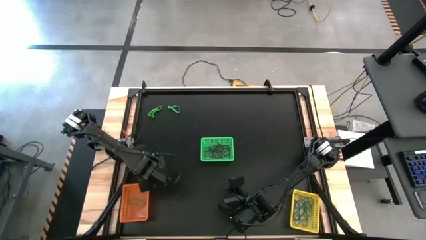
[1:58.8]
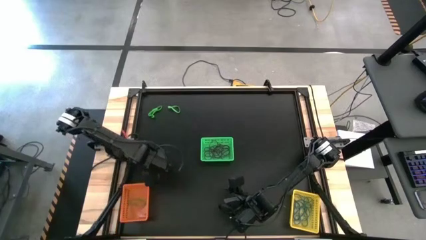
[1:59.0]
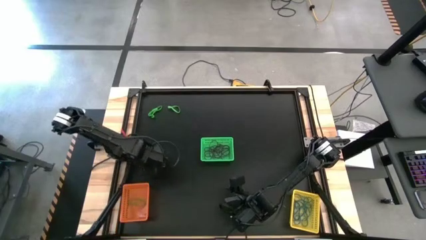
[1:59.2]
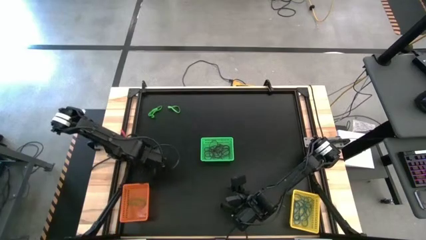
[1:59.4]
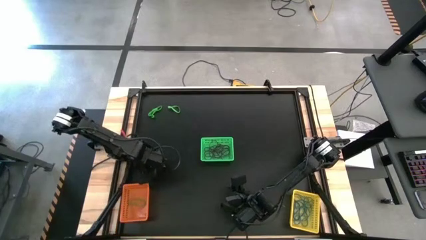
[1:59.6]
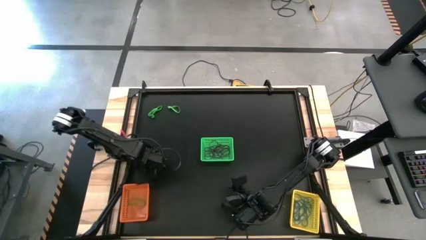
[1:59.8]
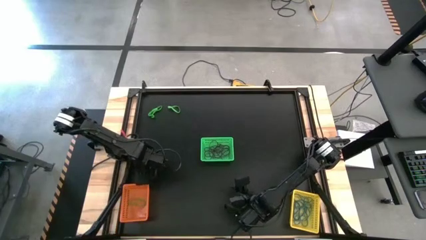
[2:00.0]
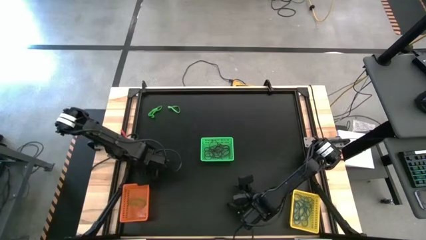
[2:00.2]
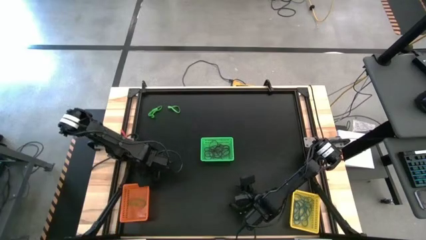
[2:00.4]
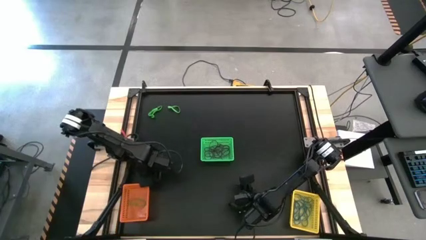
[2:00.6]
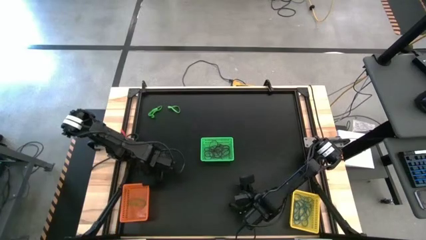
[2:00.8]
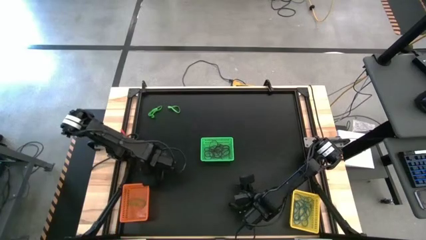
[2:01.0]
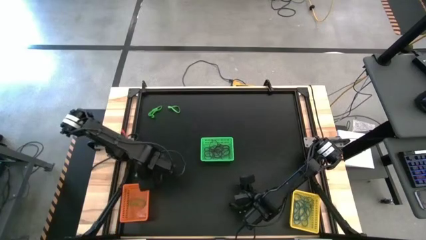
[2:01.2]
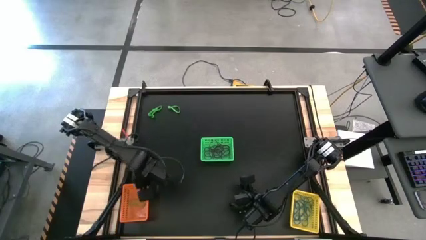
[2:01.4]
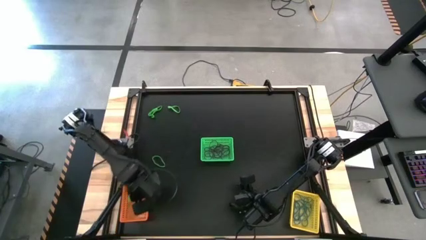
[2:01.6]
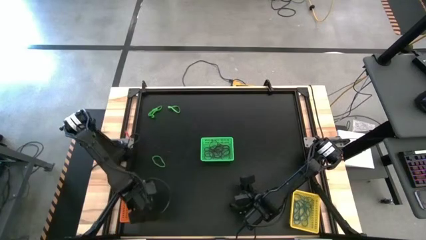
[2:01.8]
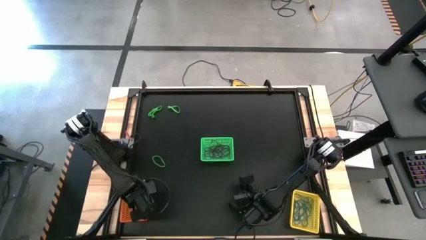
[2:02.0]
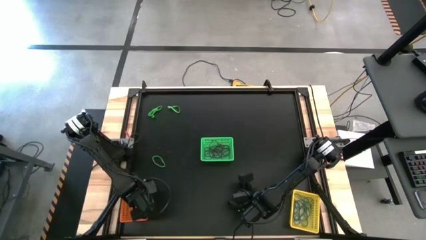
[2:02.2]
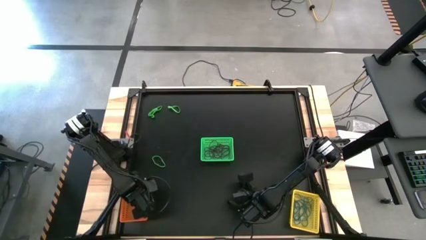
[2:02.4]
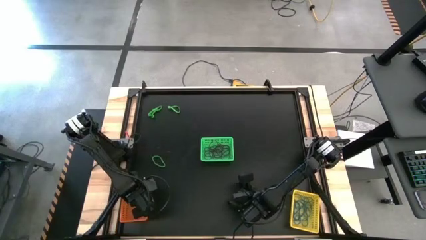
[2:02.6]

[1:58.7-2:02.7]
Task: Sort rubber bands into baskets
Put the green rubber band into the orange basket

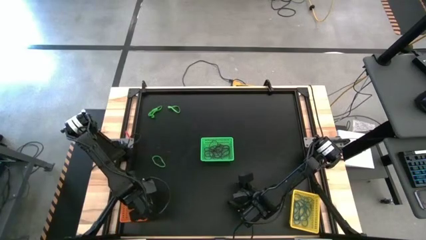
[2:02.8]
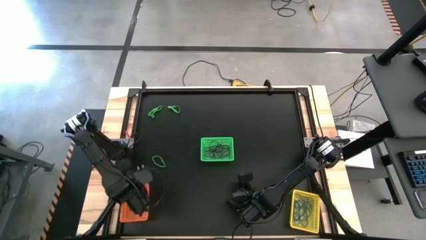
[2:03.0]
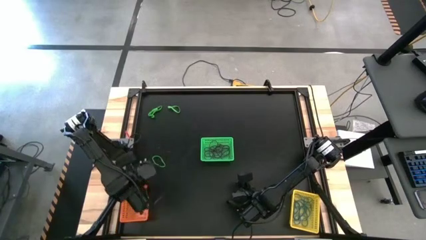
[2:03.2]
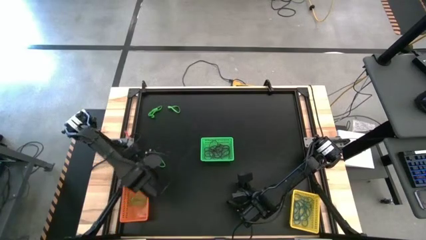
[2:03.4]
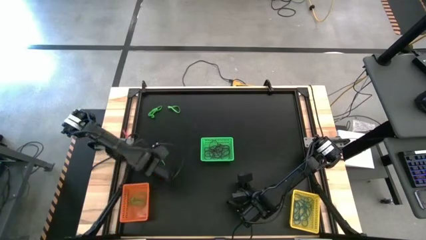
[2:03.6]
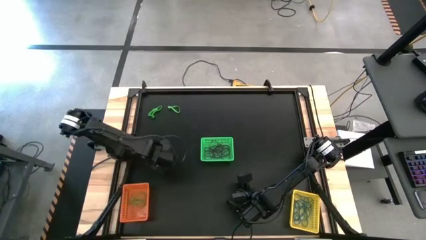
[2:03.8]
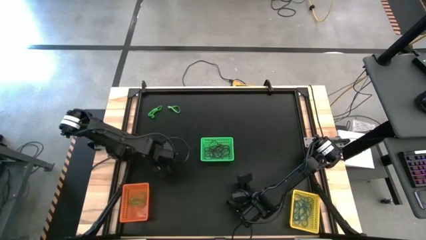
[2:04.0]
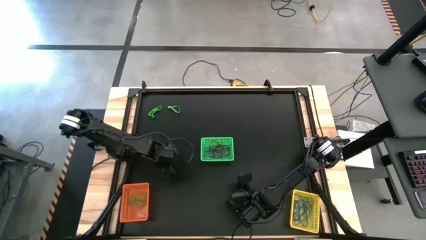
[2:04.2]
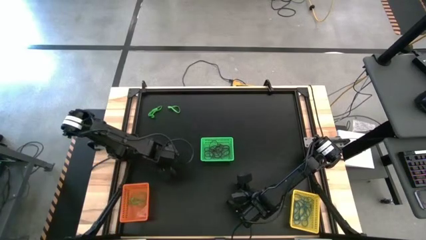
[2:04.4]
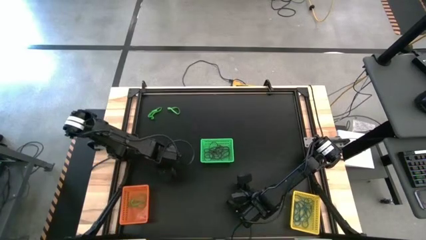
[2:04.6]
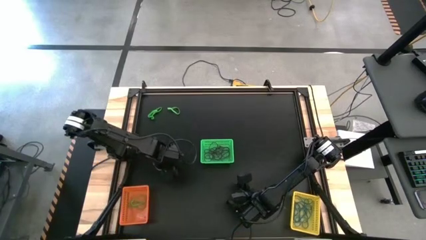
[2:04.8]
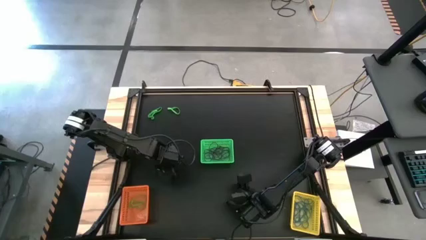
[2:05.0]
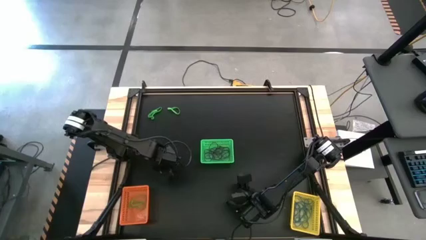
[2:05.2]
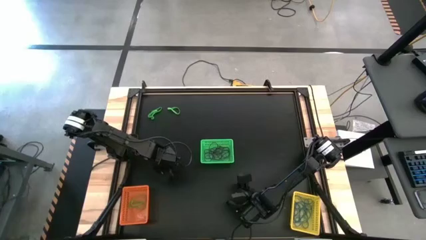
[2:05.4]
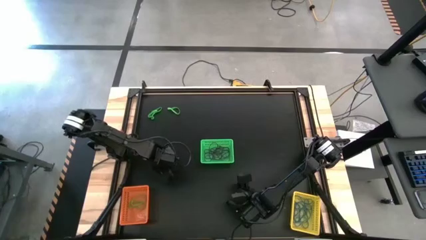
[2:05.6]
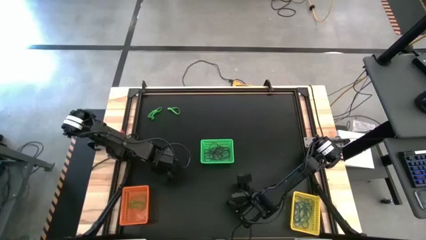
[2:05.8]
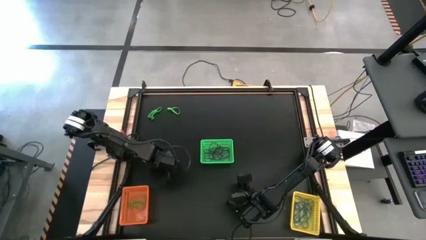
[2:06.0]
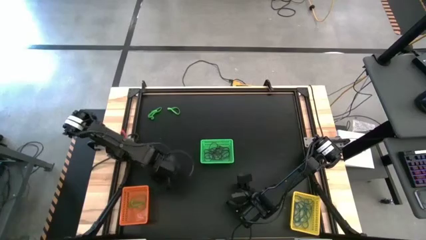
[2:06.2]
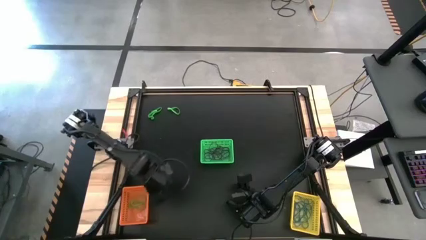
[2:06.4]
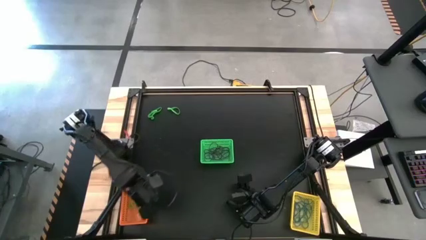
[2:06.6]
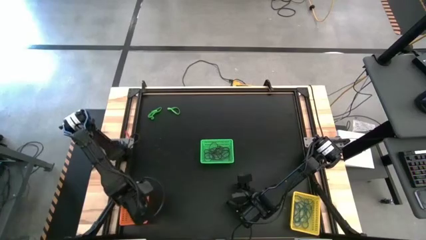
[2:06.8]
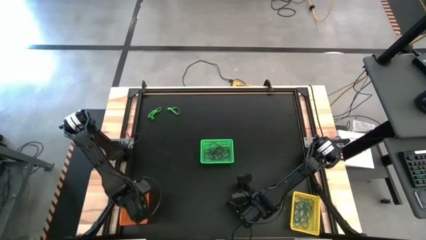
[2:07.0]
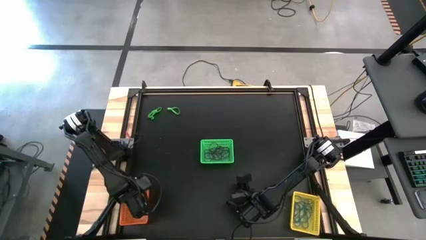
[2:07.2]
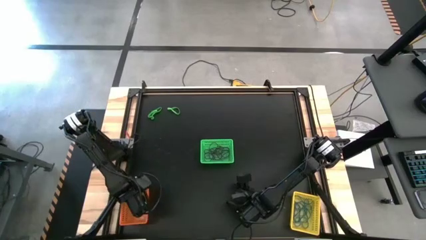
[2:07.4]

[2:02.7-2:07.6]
Put the green rubber band into the orange basket

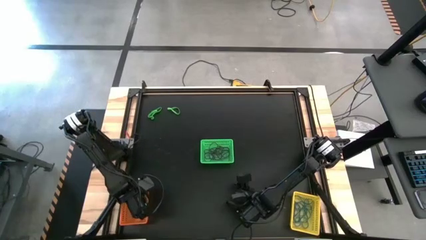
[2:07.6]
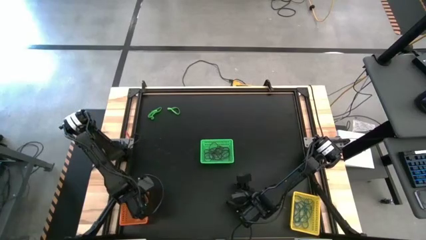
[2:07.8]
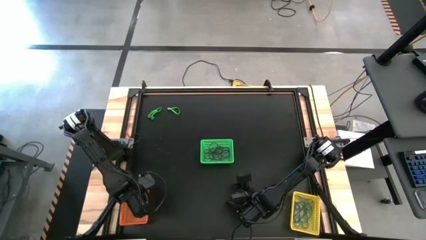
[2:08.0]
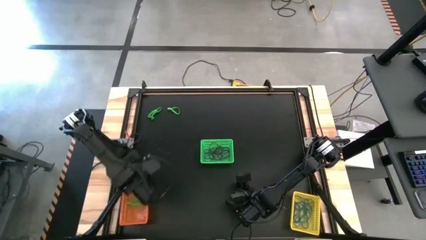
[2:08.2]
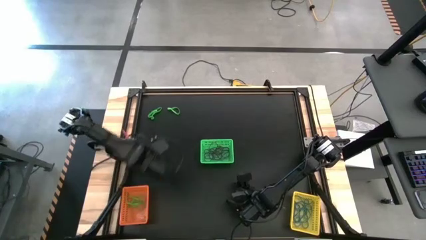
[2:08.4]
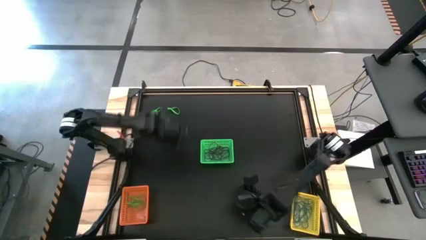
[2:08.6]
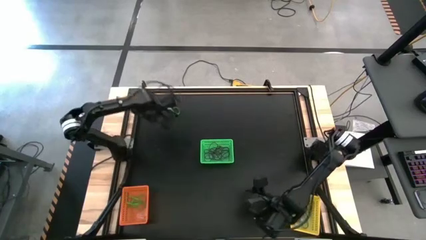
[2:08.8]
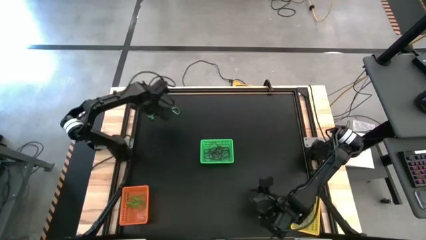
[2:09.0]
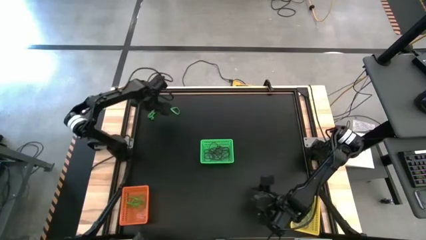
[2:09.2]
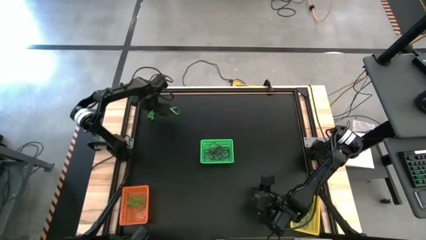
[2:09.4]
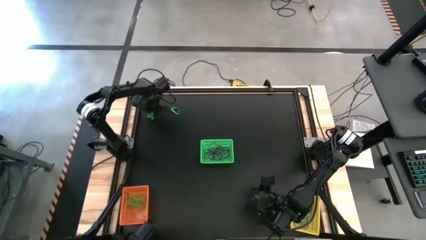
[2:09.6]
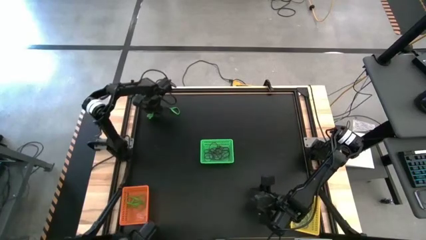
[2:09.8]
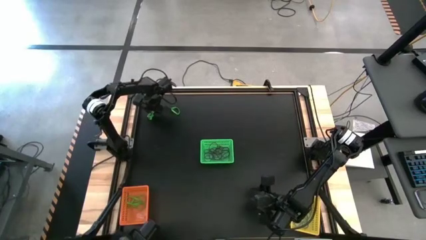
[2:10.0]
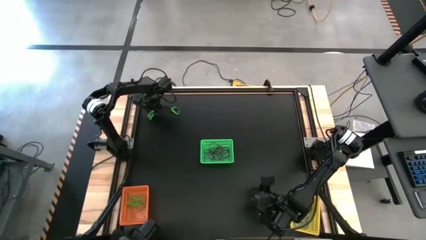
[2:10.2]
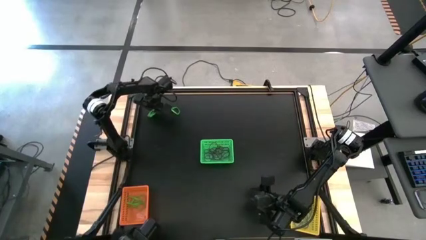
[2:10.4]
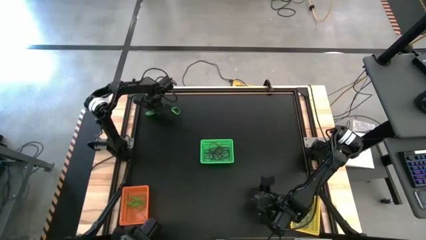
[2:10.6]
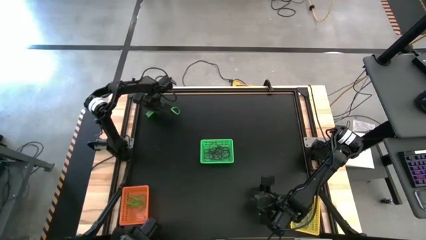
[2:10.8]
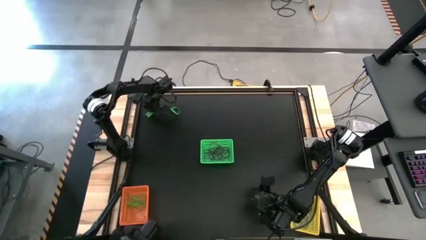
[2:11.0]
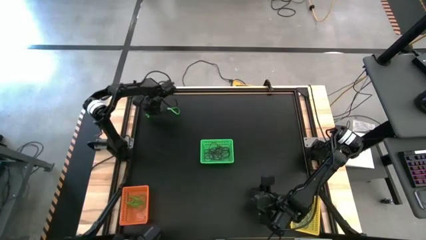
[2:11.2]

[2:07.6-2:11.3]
Put the green rubber band into the orange basket

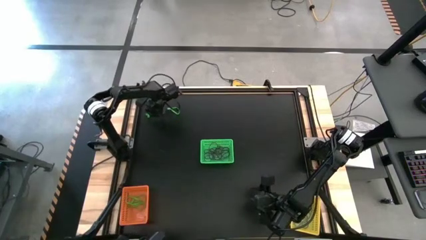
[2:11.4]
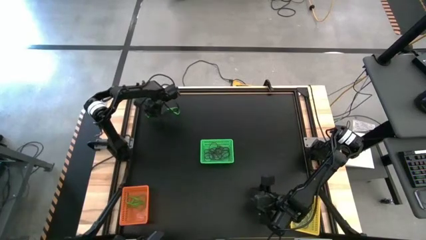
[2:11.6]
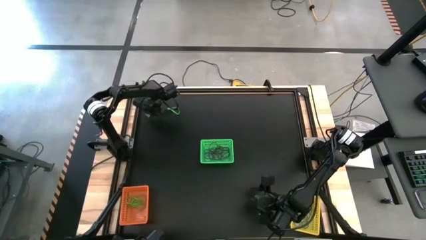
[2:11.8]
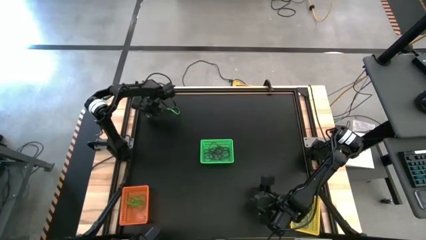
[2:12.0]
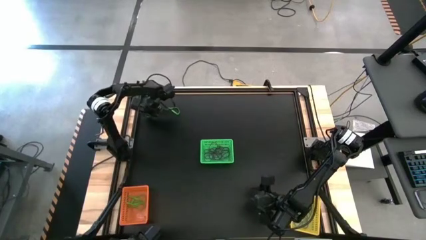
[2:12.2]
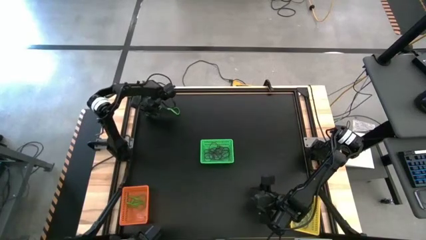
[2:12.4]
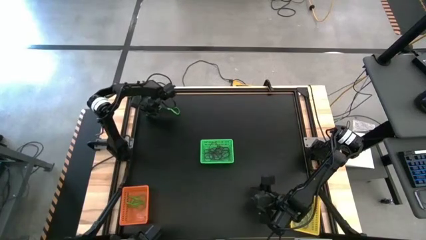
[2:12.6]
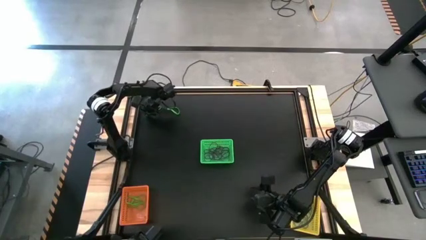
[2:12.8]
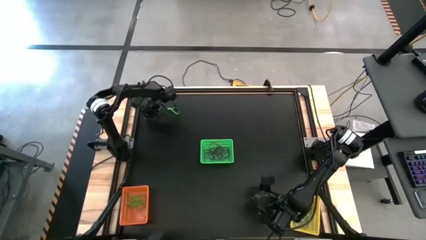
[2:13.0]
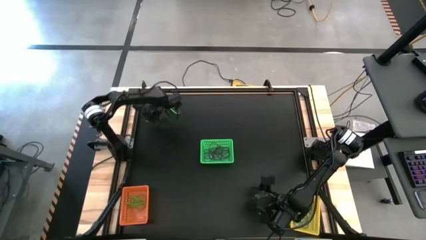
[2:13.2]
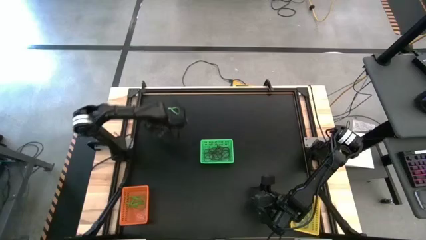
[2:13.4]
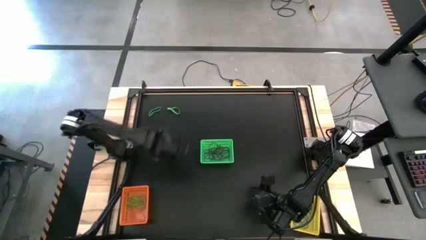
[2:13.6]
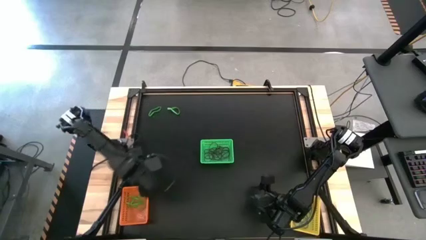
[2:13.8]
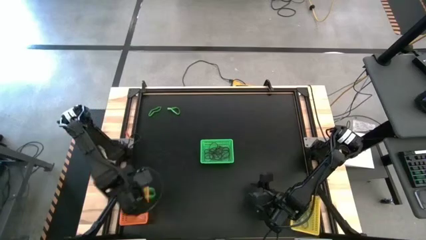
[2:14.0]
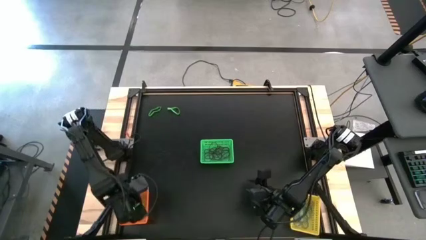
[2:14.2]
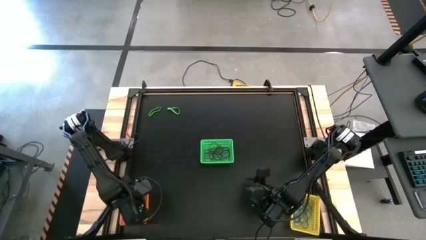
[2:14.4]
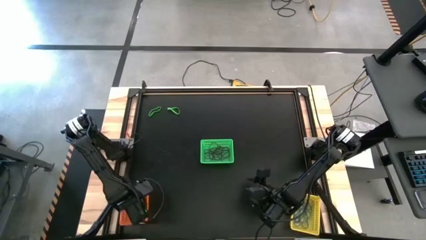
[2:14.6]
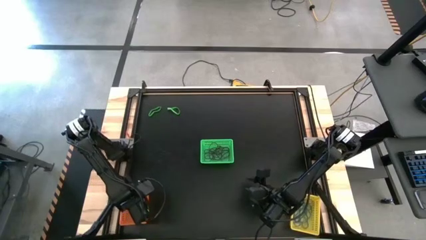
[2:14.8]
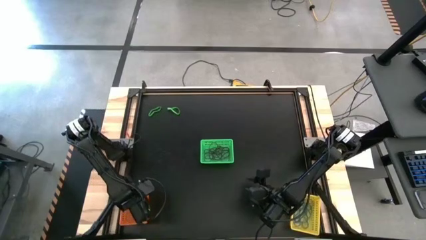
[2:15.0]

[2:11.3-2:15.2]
Put the green rubber band into the orange basket
